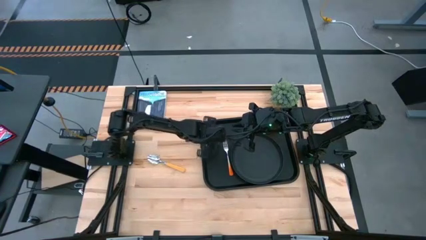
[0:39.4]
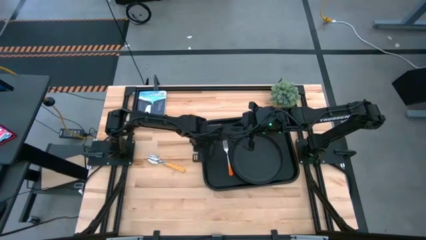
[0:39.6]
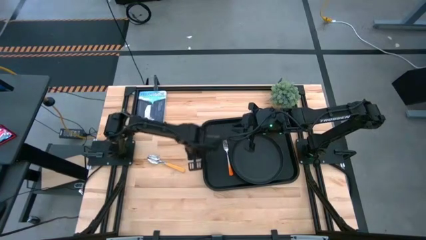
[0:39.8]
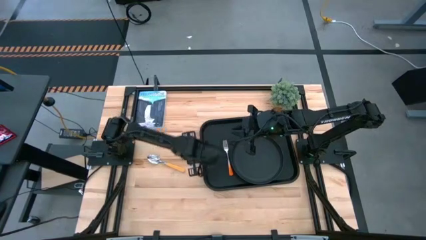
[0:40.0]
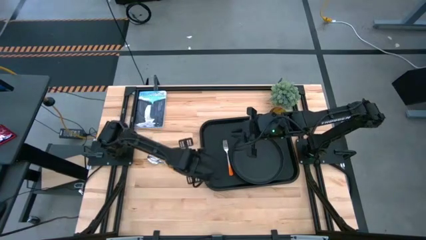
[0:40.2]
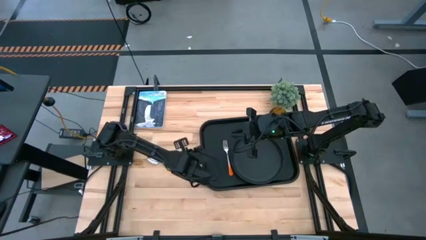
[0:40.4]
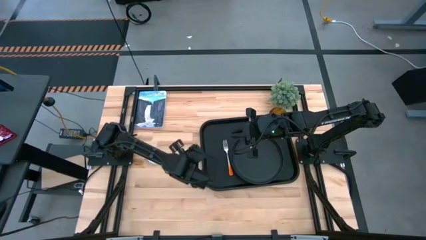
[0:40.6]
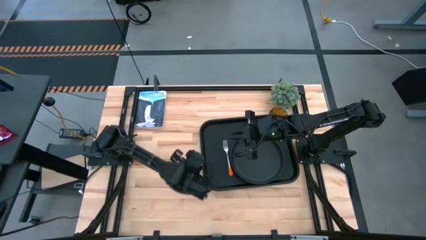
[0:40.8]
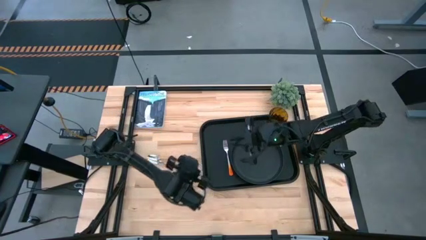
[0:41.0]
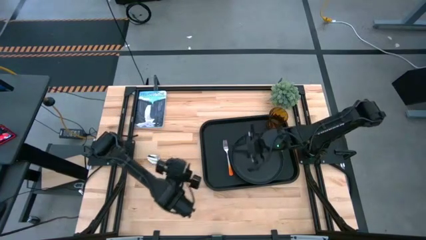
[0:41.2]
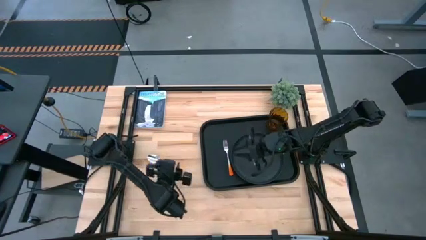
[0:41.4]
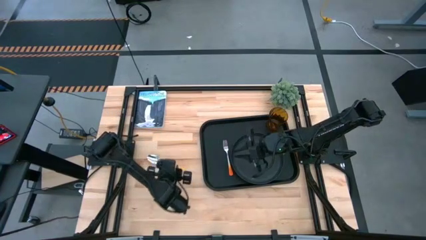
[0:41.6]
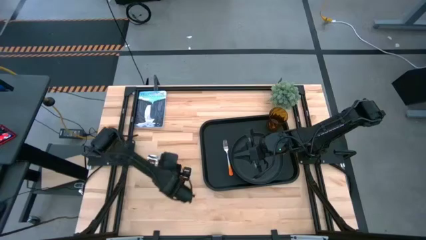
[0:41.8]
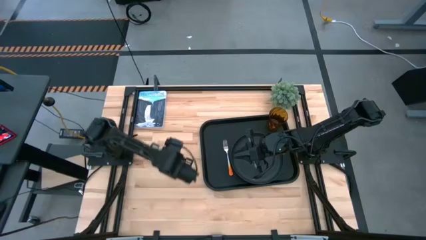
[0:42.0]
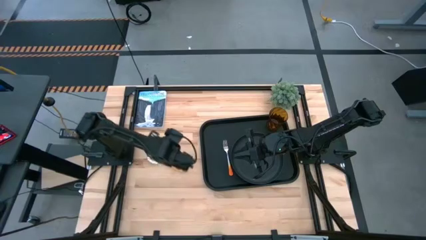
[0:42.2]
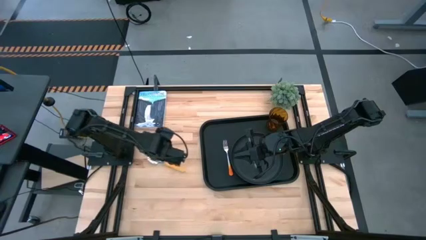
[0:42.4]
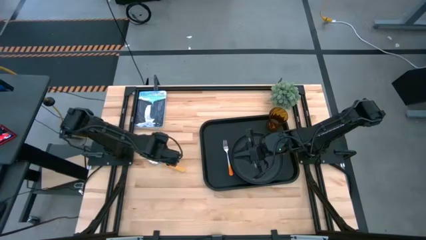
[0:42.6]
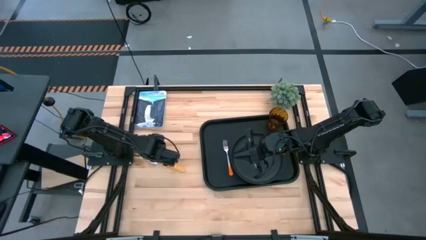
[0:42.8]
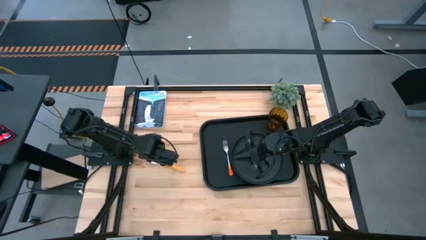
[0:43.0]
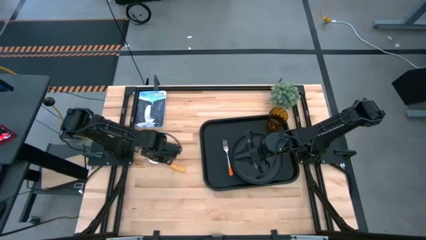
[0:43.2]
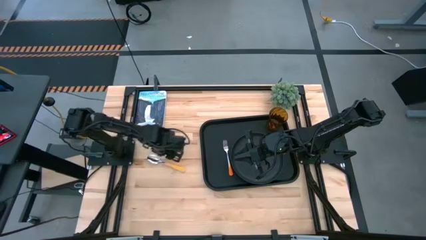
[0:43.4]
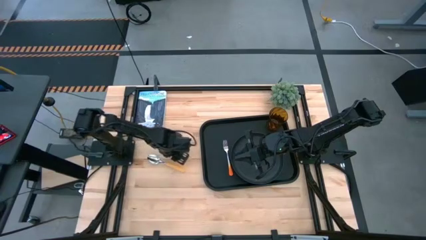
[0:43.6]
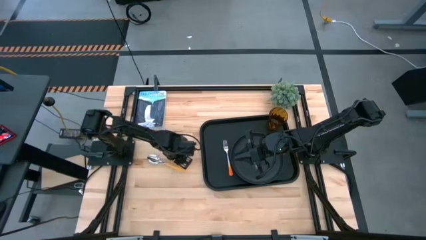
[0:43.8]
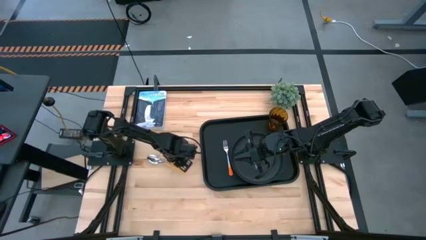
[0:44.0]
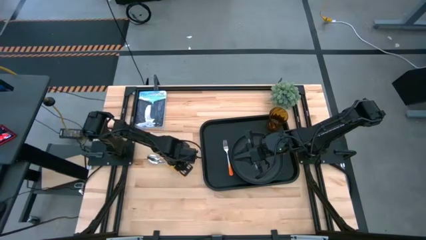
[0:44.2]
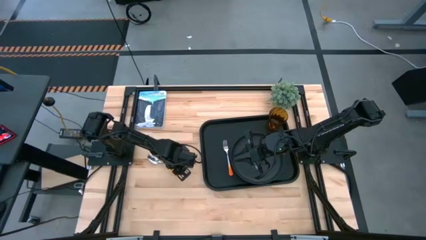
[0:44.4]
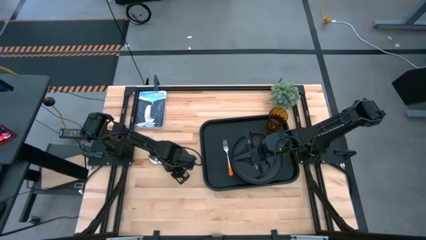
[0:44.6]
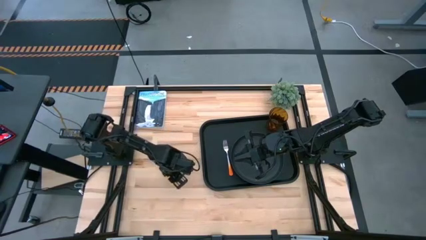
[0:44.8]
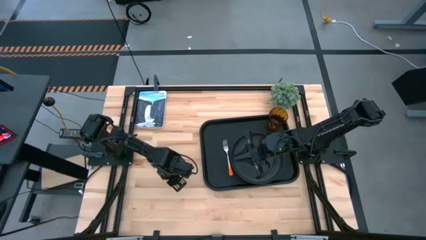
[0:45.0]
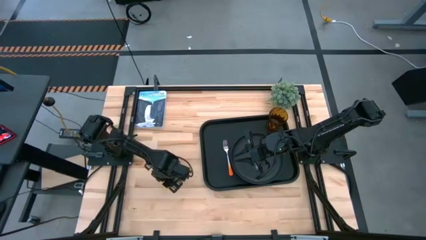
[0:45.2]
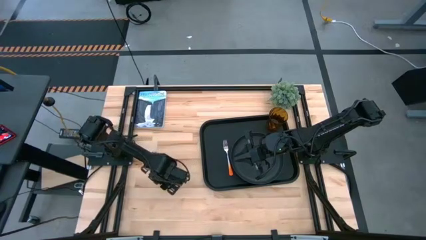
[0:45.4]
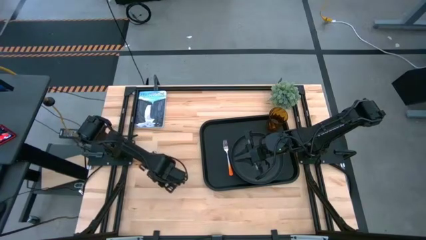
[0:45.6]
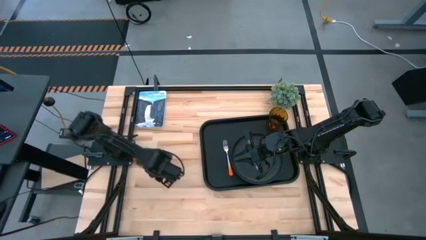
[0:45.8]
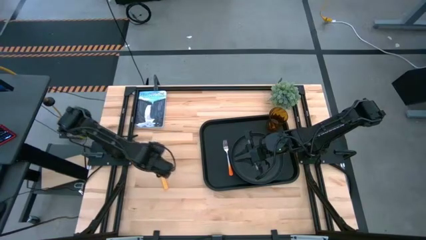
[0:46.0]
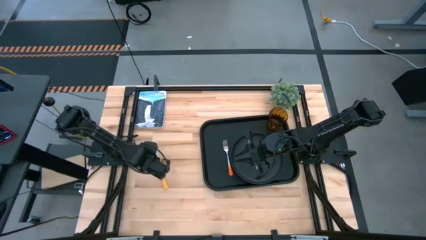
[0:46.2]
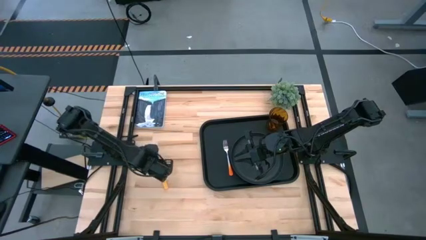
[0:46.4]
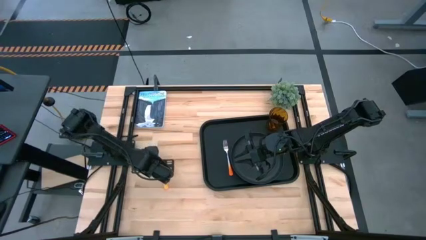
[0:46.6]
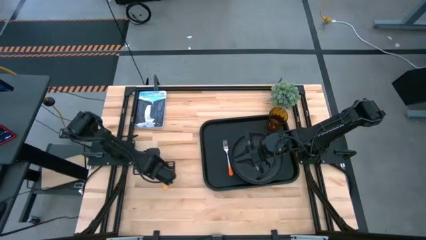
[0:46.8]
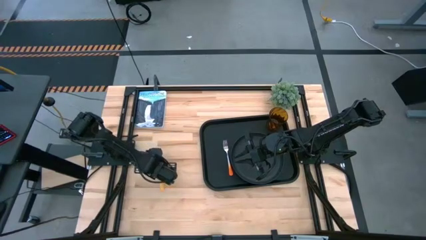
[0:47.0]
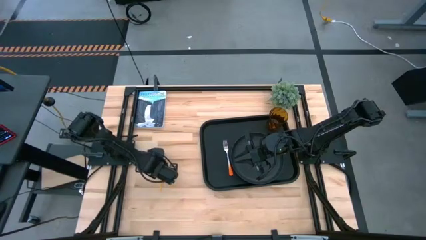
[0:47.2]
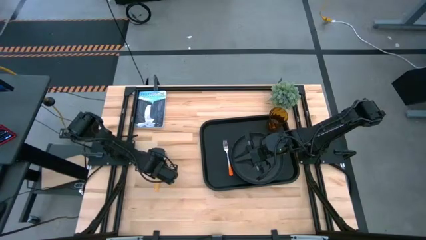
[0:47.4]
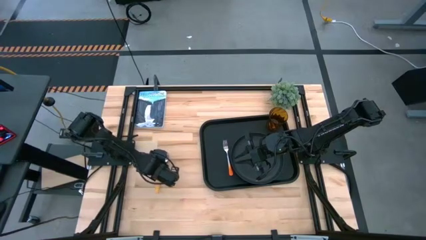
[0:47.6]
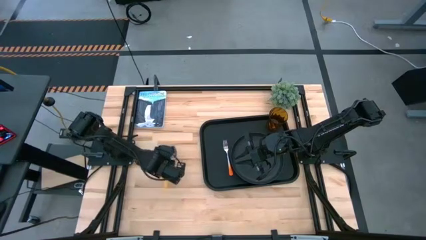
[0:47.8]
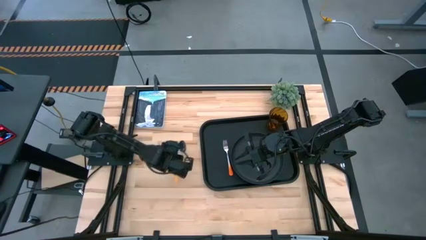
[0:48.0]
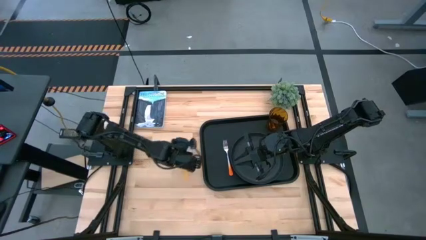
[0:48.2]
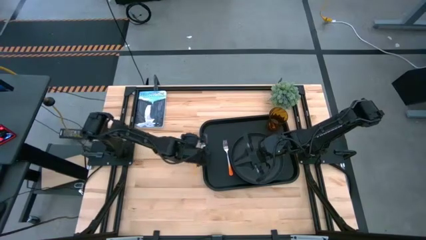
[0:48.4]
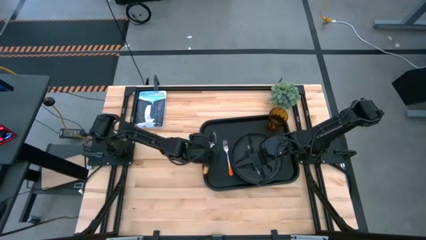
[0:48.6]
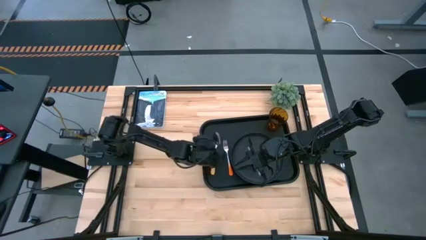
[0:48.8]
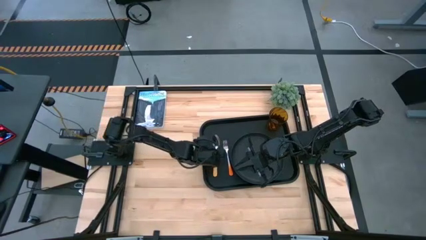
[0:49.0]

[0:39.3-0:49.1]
Task: Pick and place plate/cup/fork/spoon on tray
Put the yellow spoon on the black tray to the left of the orange fork

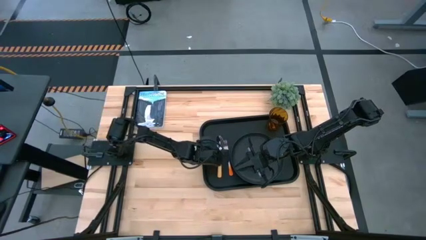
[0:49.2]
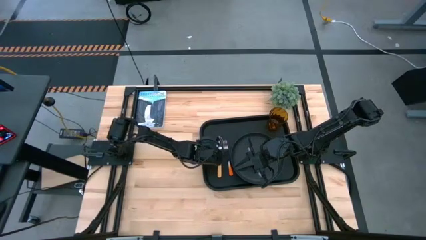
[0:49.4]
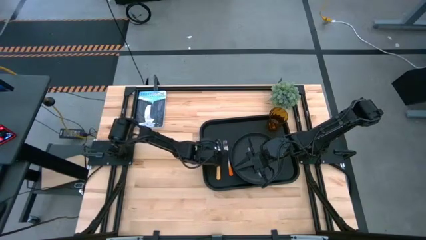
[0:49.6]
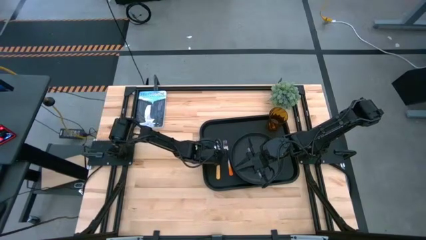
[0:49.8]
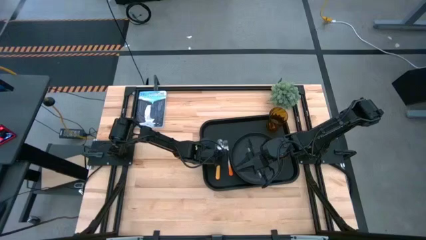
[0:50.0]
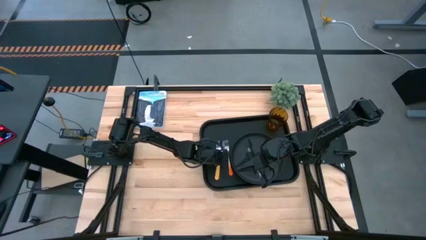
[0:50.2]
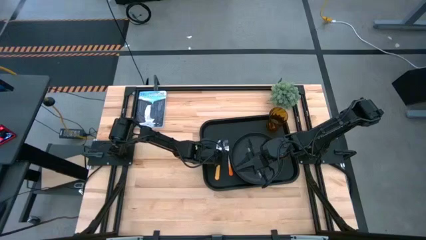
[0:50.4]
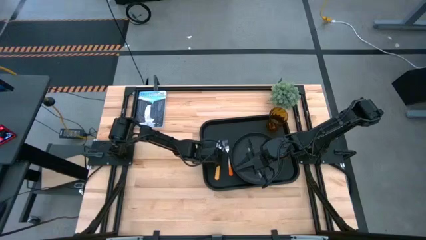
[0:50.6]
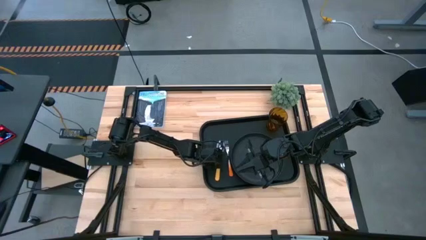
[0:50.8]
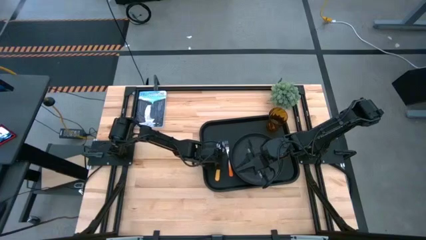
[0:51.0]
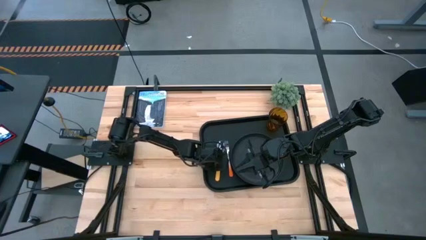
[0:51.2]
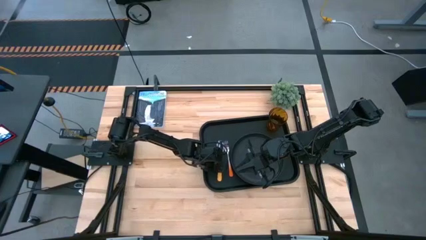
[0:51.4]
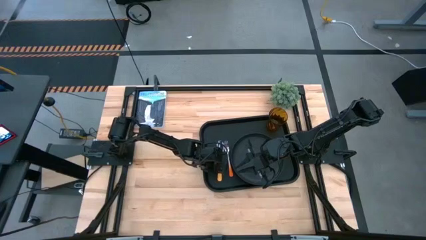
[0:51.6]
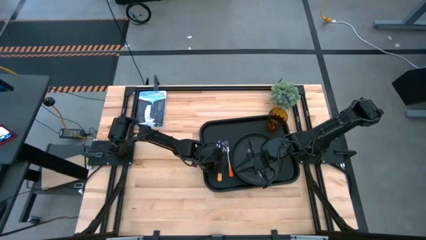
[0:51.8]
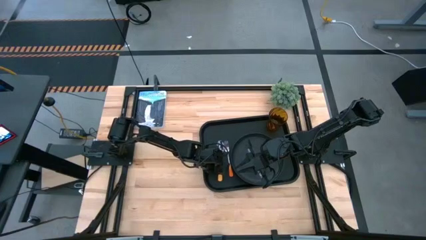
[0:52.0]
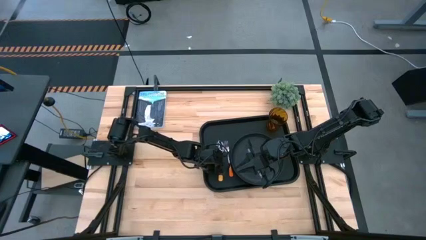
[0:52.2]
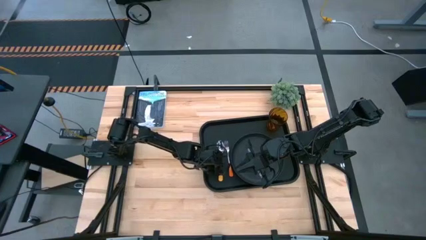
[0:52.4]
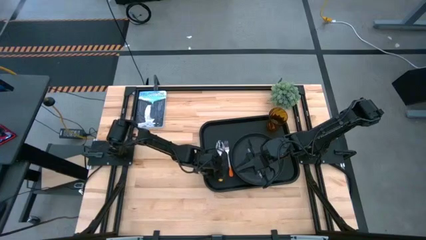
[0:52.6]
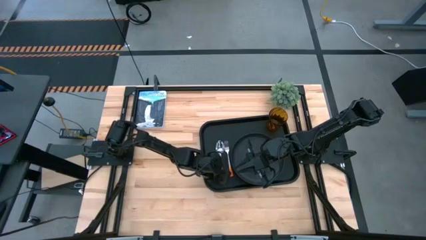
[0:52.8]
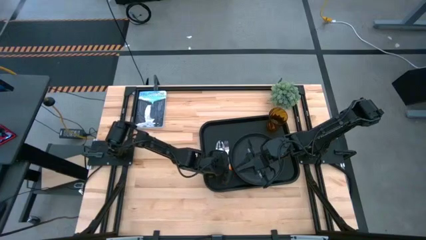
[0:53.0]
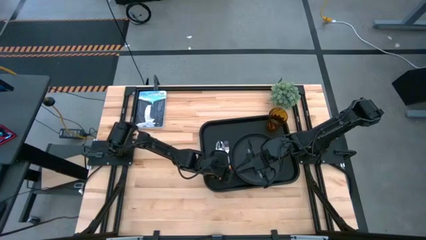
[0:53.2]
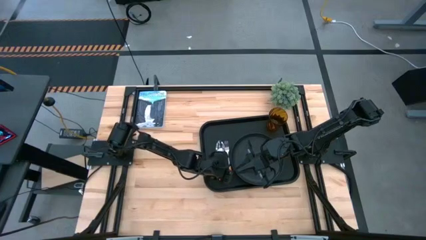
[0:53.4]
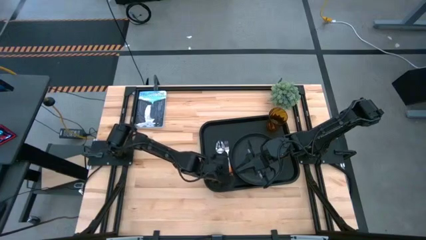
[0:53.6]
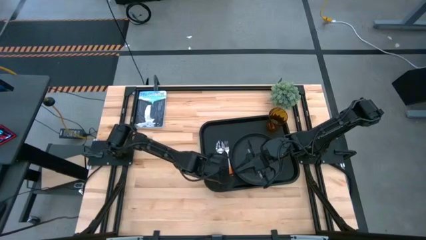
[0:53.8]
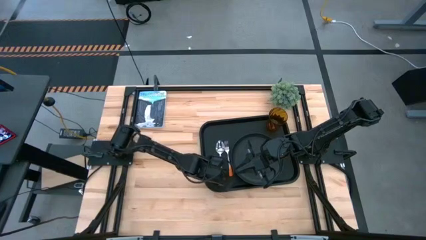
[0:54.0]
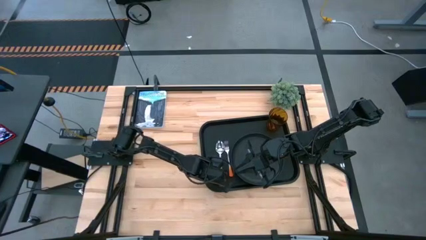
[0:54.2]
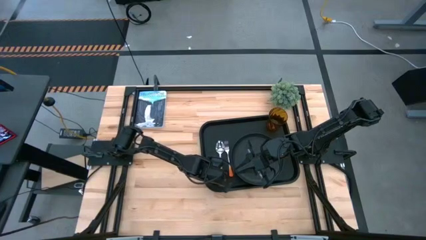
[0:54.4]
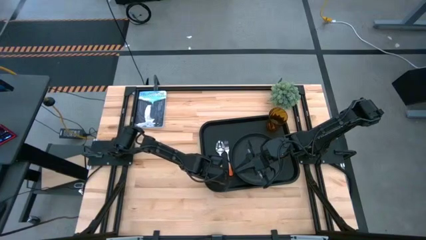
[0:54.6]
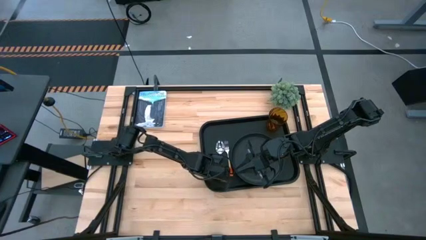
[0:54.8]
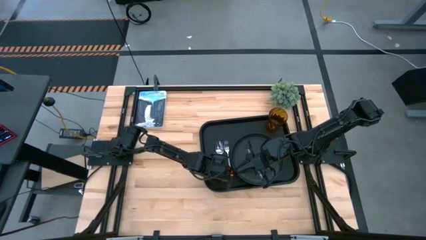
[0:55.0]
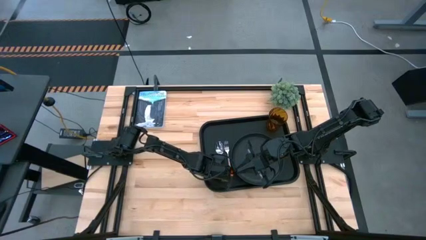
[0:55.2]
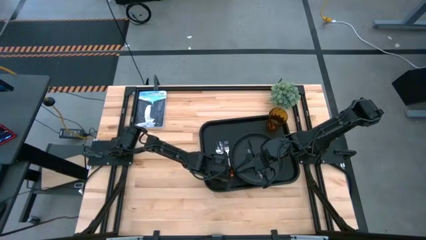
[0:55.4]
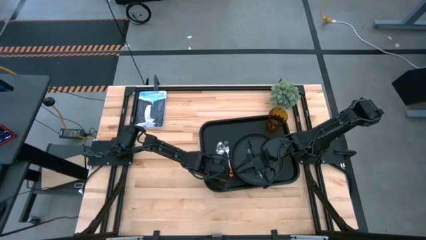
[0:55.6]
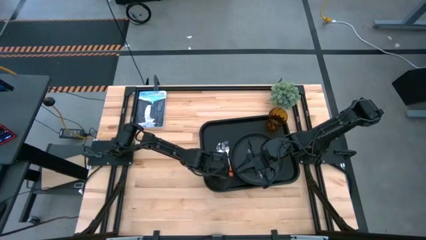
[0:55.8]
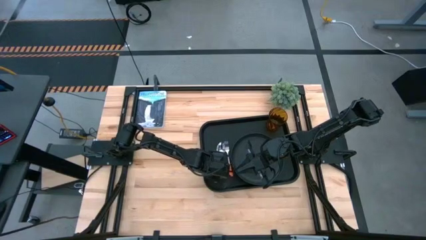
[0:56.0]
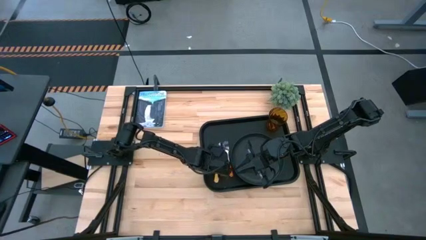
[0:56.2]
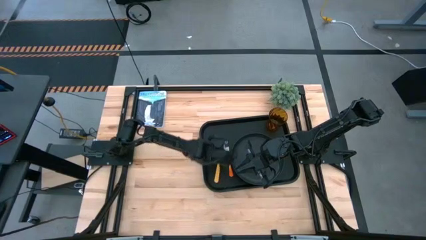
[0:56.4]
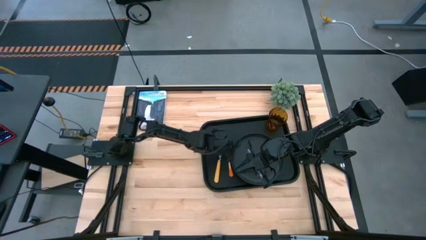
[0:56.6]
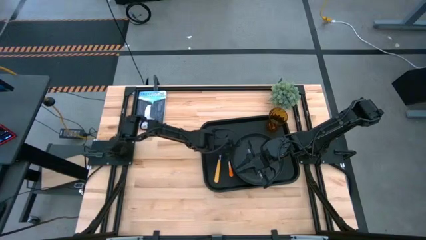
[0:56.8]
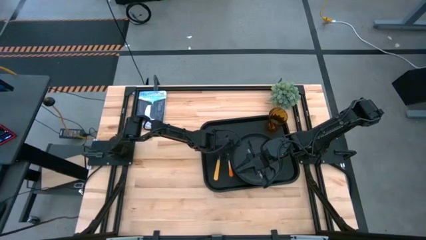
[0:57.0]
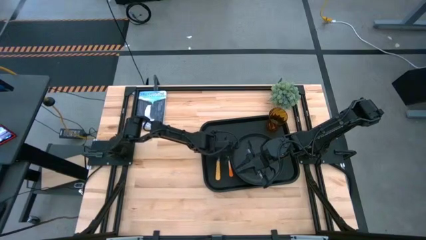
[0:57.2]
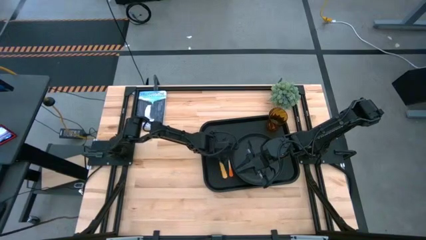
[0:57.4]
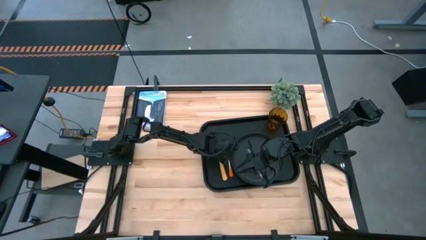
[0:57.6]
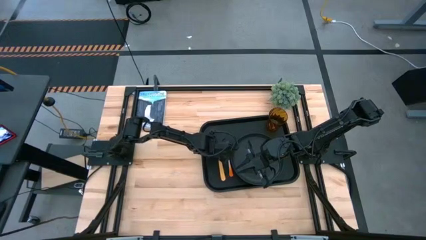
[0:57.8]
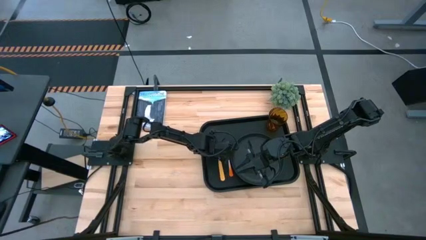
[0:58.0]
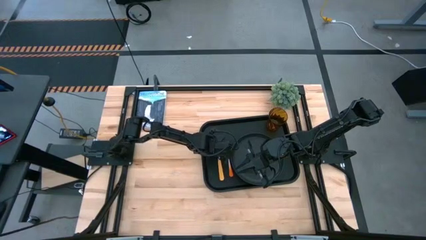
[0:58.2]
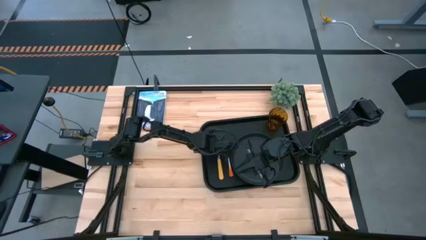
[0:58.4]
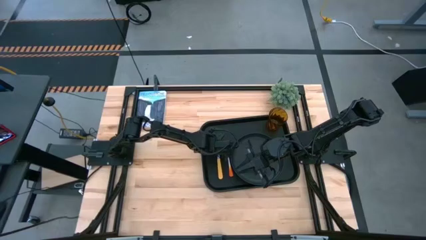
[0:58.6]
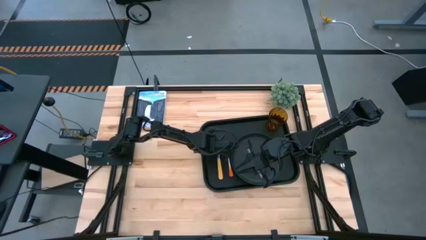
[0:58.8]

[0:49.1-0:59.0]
Put the yellow spoon on the black tray to the left of the orange fork
